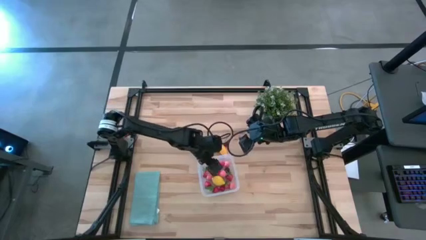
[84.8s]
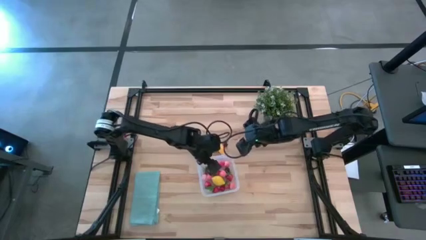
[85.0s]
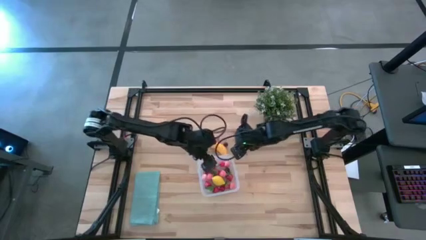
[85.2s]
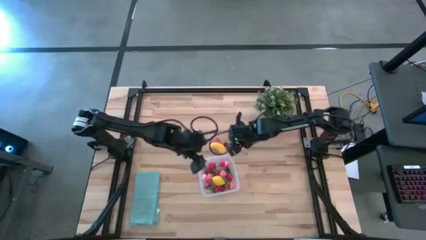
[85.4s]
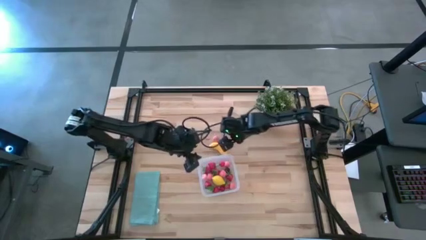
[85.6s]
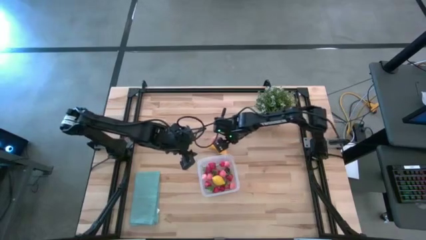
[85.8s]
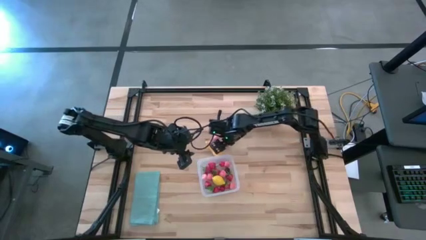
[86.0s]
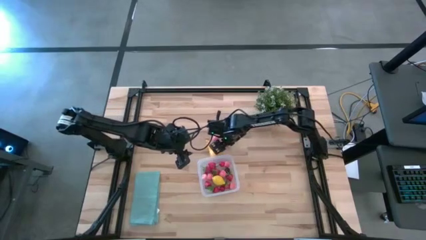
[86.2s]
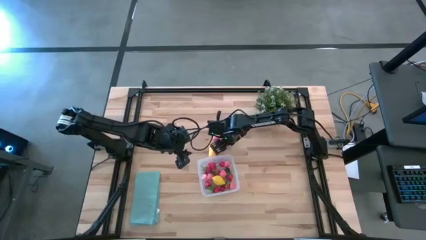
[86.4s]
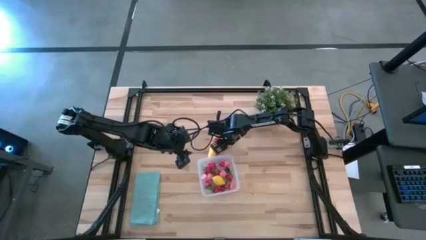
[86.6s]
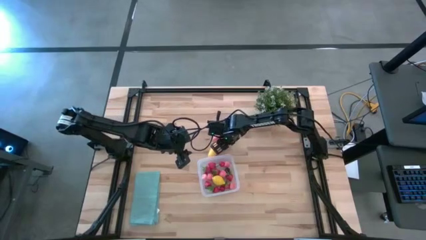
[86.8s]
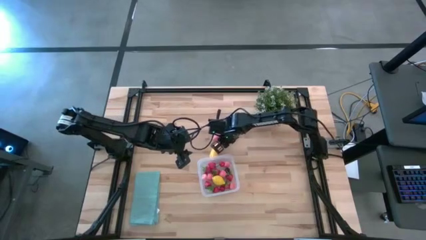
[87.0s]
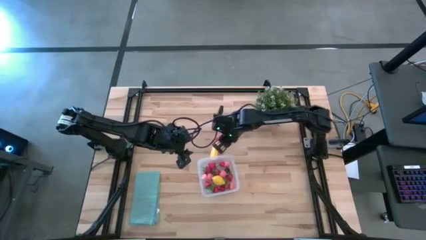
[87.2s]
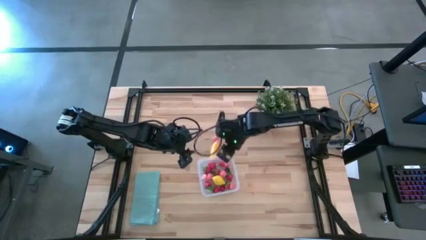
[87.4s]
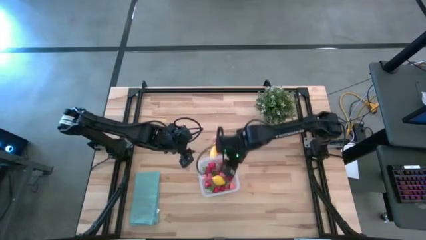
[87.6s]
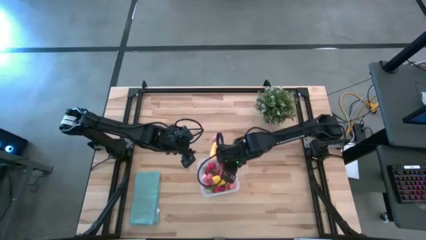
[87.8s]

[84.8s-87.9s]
Task: Pick and placing Produce into tupperware
Put the red cherry into the transparent bin

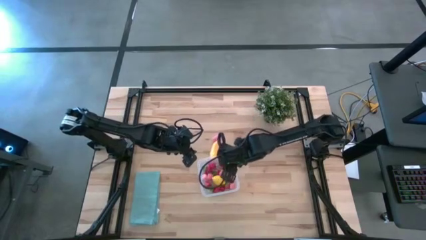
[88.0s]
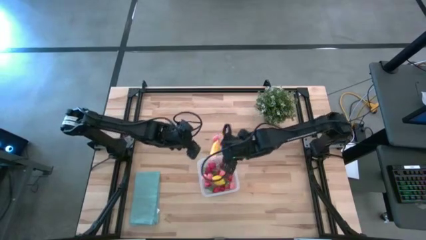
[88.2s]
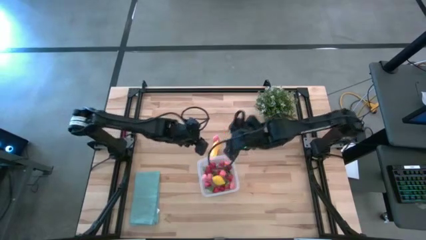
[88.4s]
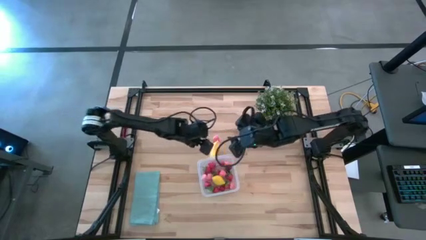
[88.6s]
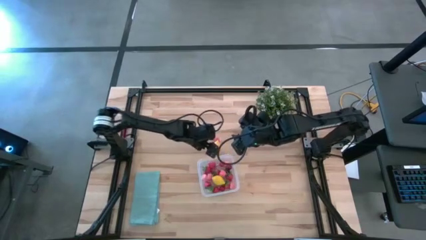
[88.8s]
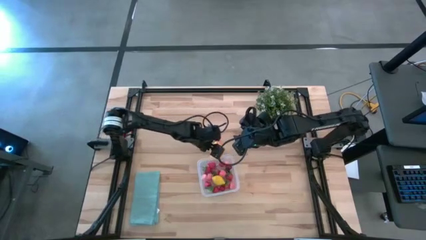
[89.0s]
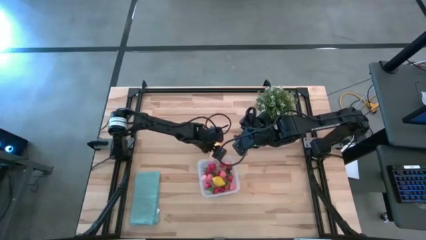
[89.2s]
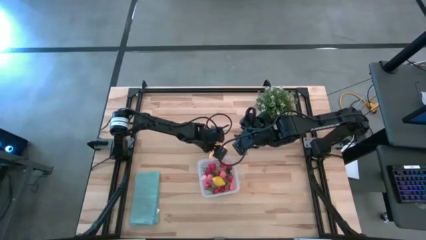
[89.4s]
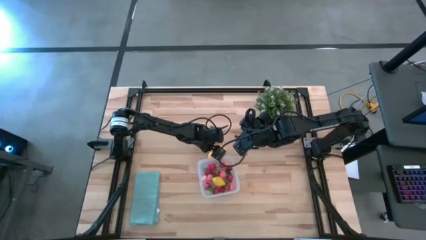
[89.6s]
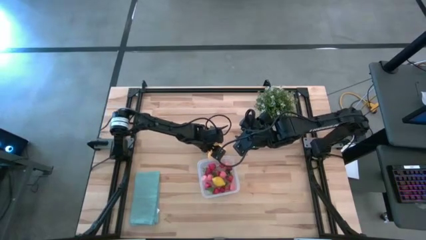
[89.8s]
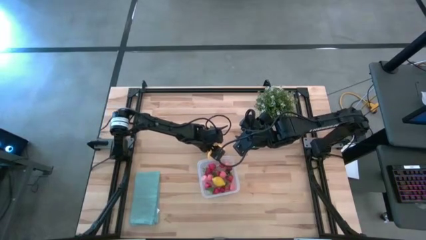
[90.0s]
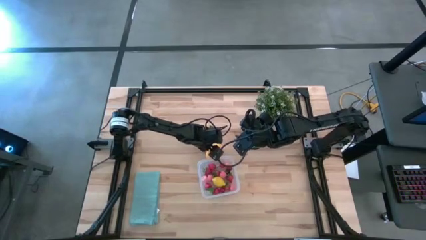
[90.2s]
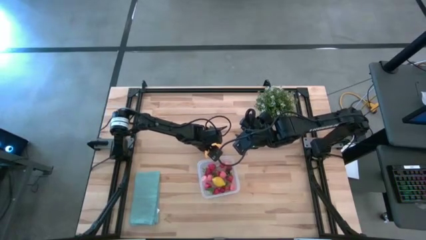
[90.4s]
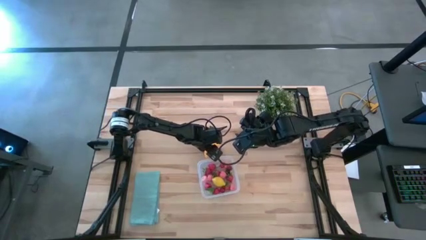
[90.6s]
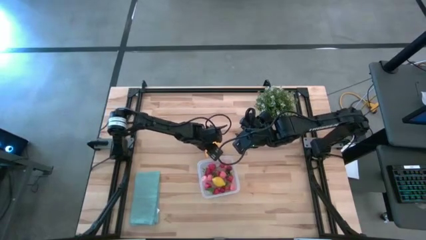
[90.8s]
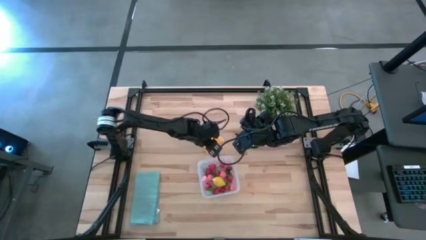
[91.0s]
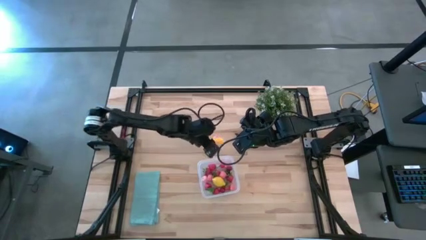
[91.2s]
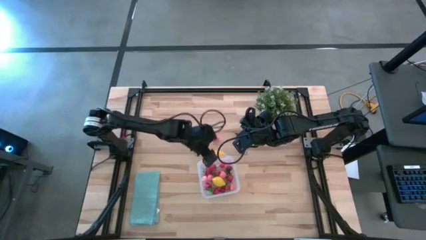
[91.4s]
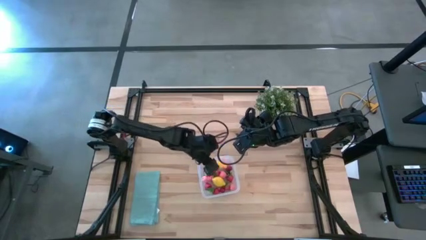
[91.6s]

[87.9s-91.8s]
Put the yellow banana into the transparent bin

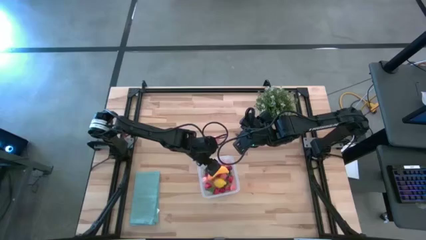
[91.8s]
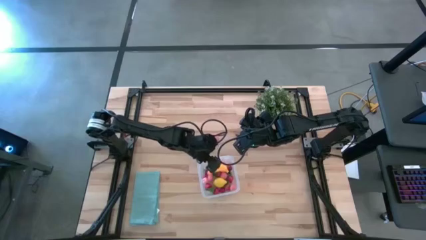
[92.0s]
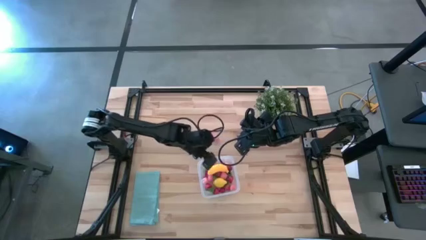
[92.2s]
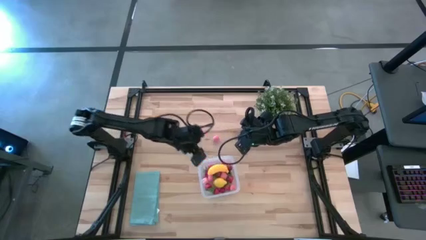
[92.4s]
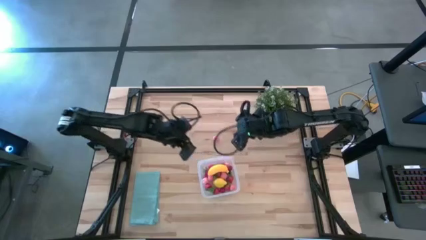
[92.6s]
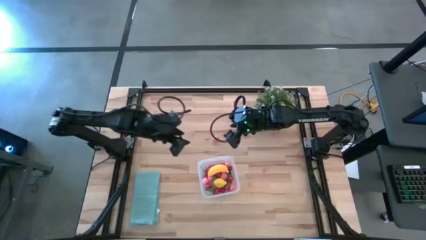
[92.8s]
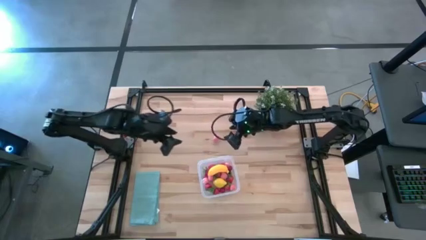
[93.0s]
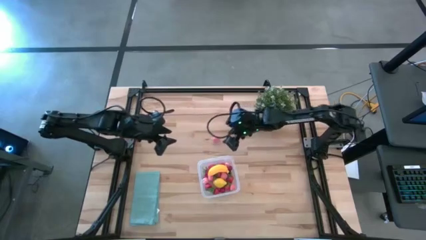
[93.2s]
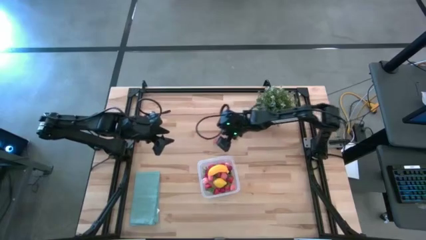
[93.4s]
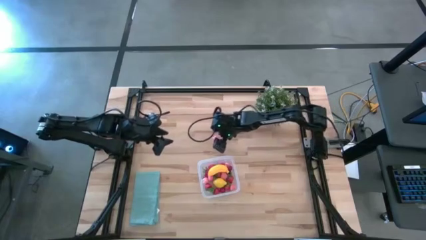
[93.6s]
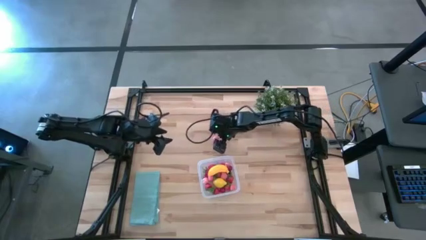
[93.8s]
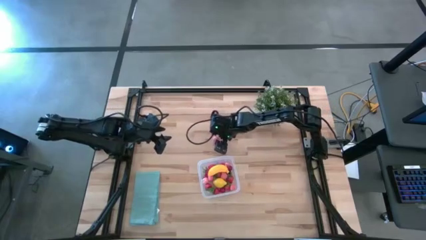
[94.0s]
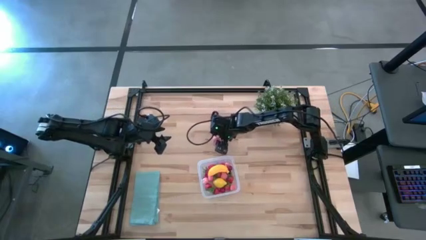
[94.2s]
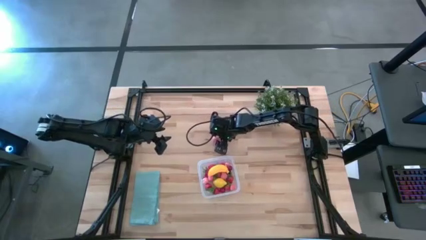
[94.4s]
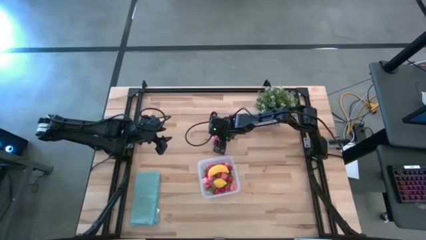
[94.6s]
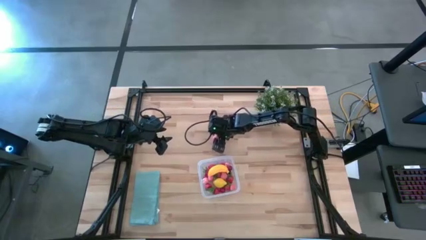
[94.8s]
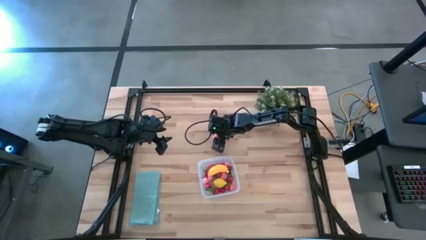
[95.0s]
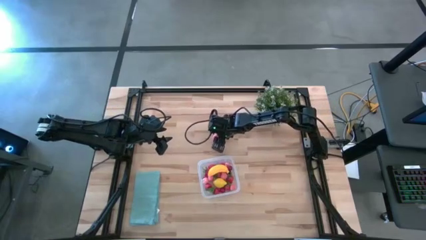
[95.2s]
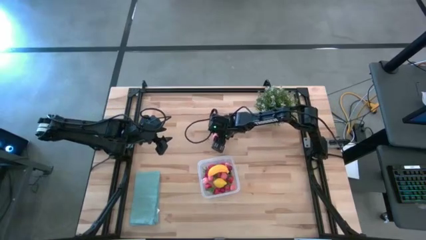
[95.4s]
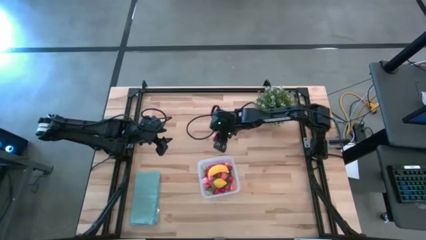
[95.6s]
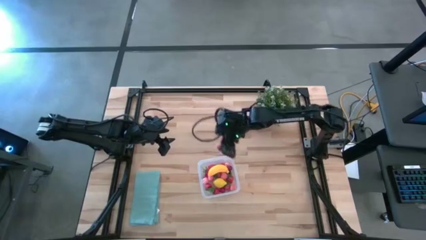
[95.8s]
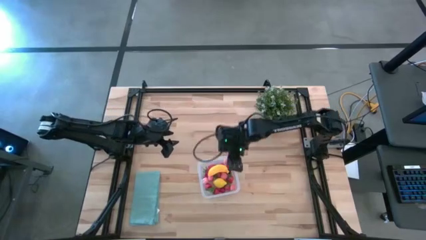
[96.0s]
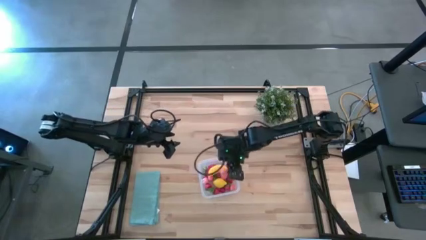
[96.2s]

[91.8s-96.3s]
Put the pink peach into the transparent bin

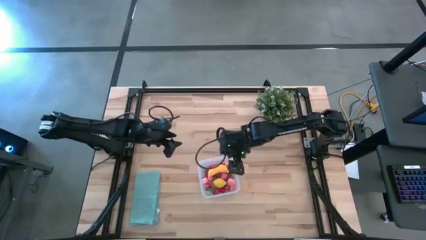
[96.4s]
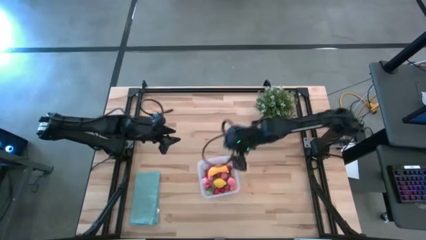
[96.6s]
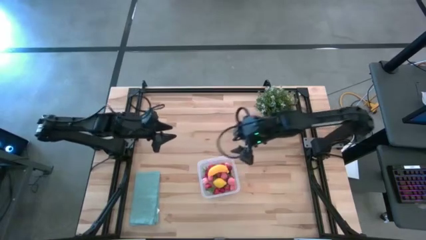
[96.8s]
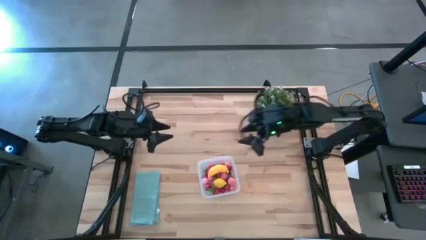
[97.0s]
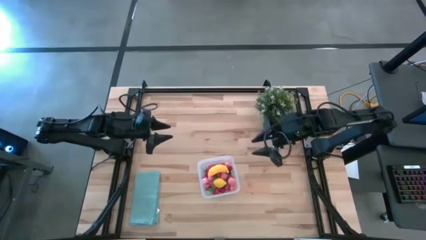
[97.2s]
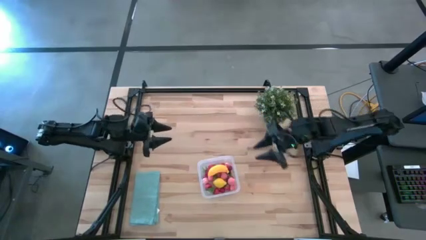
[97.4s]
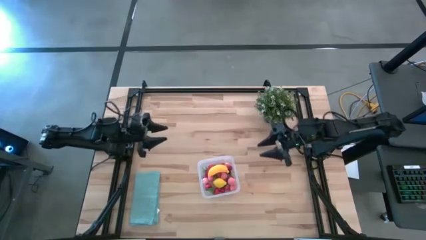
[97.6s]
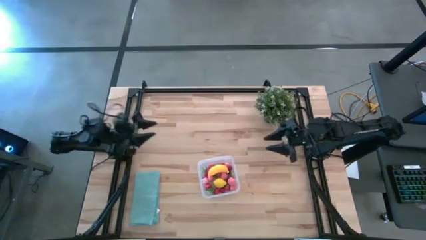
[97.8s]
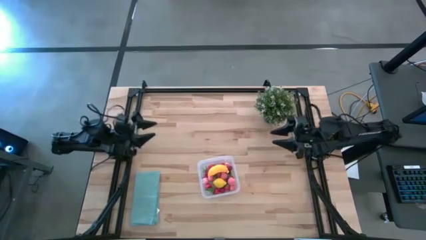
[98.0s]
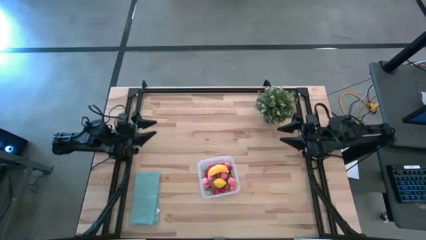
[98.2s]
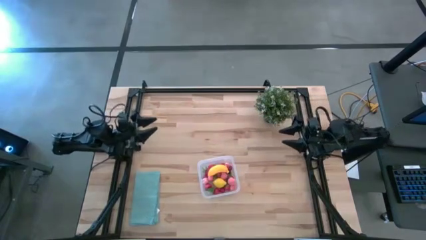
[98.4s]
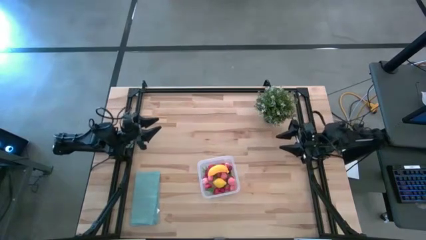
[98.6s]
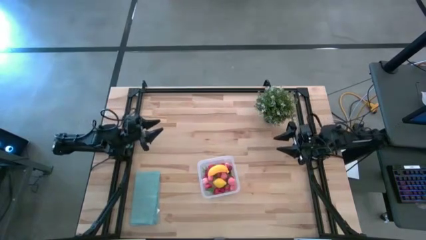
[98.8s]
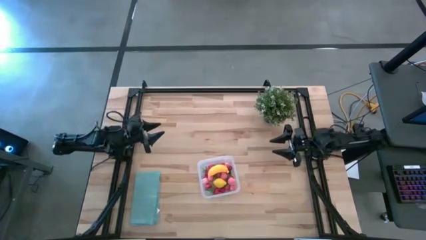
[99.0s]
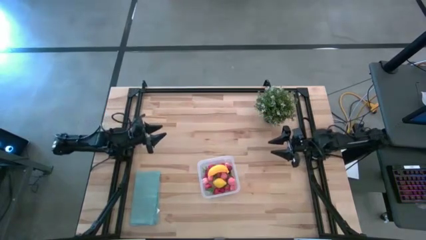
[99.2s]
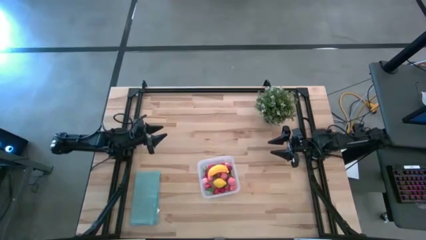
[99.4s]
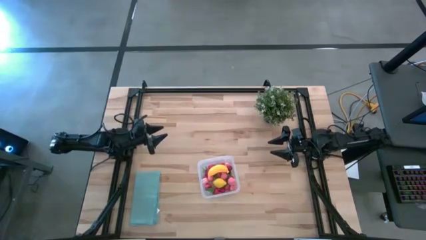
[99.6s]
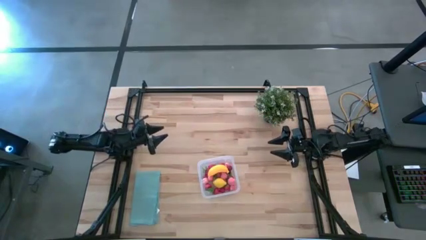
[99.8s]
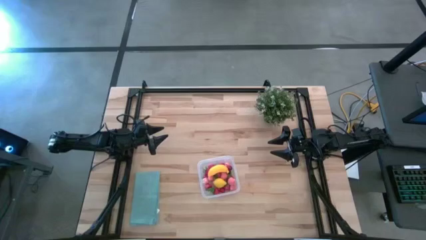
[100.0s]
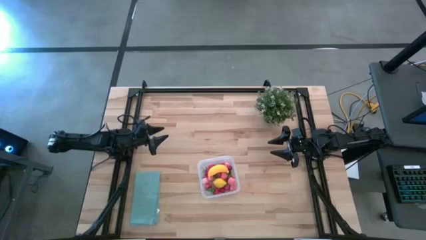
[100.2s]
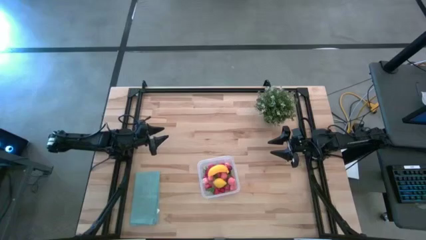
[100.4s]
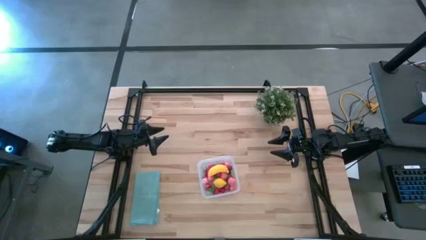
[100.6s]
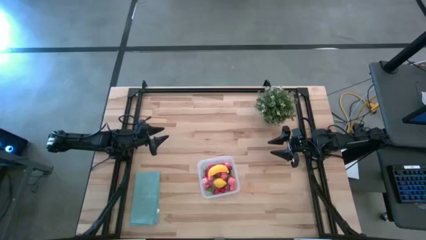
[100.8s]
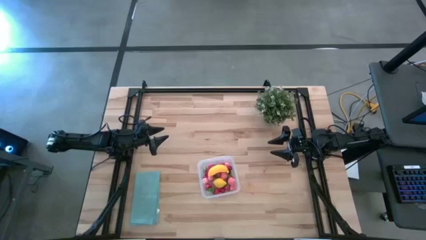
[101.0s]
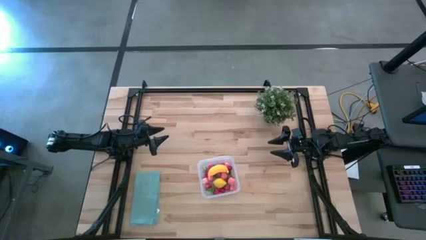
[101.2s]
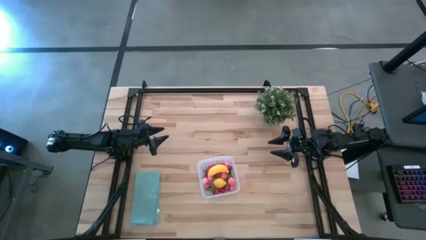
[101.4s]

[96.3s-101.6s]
Return to Home Position
